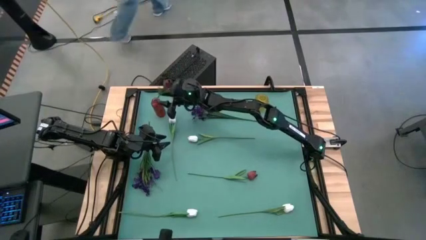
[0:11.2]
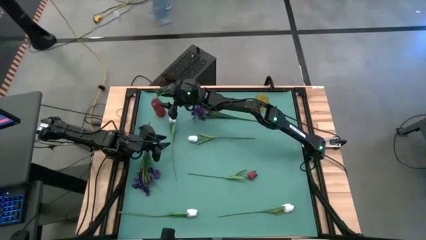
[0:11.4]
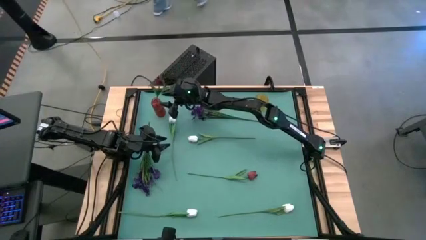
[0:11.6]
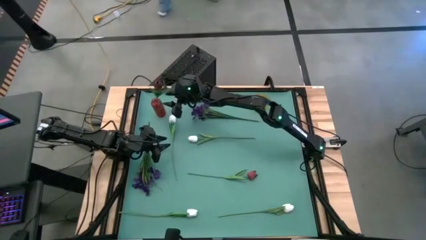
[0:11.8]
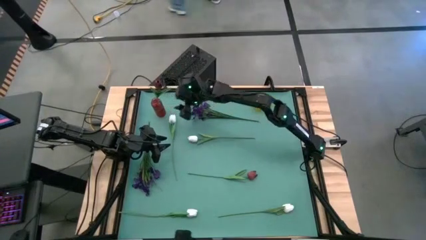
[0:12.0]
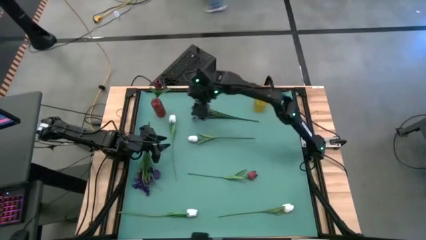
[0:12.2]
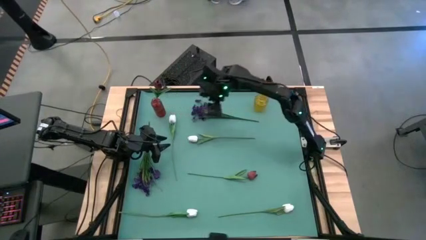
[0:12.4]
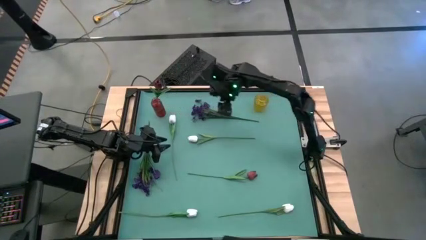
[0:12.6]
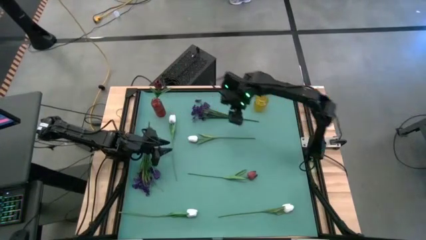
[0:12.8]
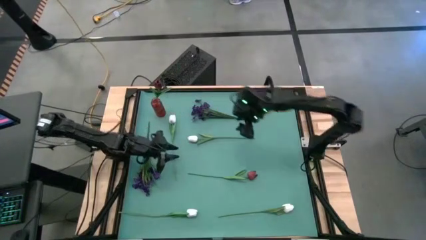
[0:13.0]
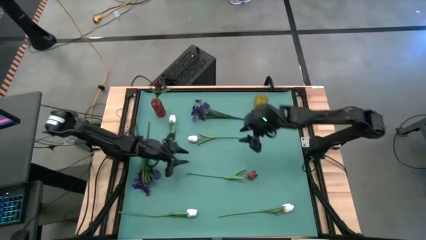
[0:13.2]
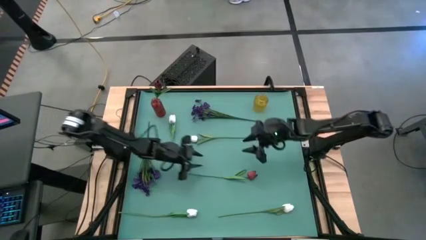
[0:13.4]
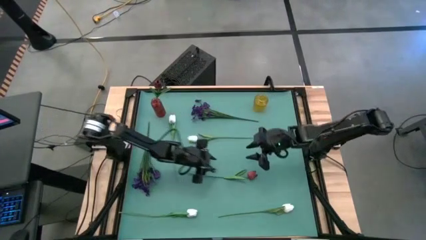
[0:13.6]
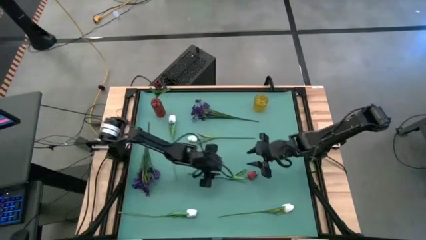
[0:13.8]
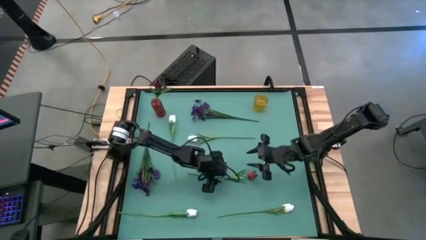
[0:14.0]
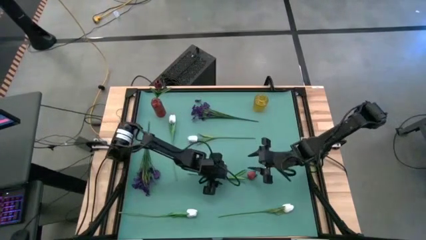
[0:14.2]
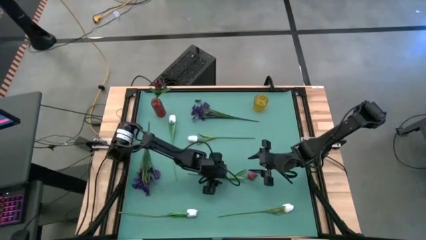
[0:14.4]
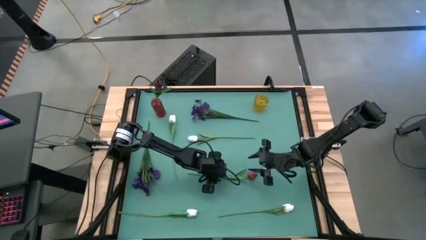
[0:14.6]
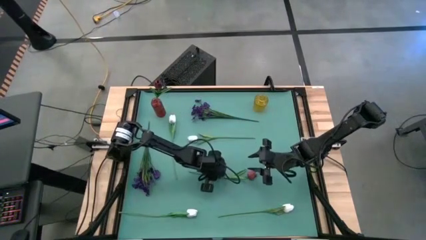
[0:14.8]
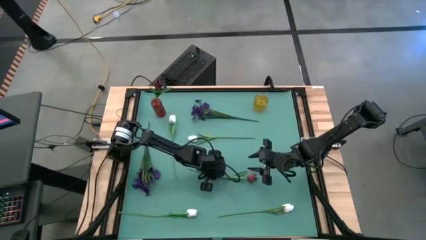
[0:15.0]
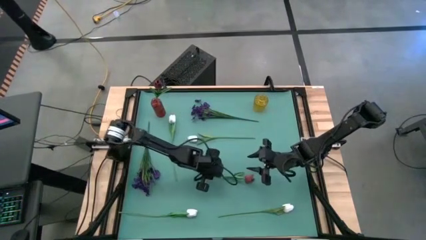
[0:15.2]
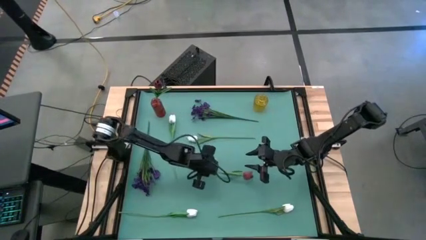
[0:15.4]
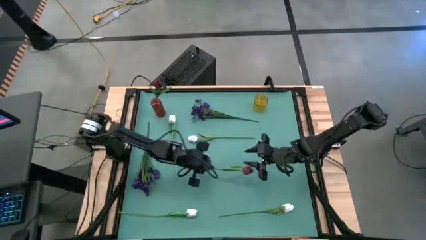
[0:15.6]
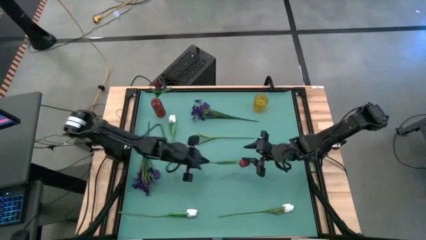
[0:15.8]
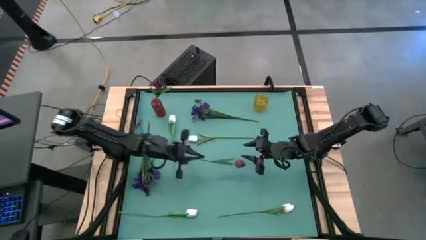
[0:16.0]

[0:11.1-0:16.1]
Task: Sort flowers into vase by color
Put the red tulip into the red vase

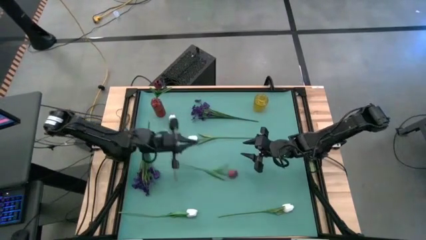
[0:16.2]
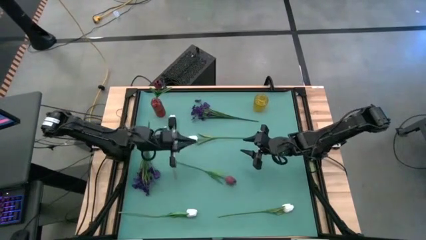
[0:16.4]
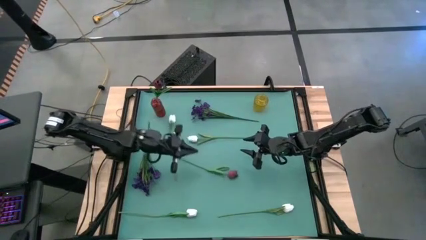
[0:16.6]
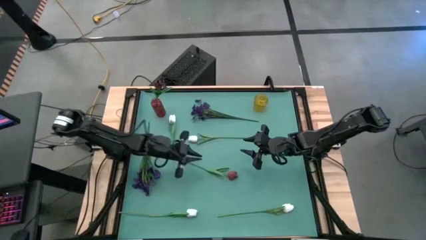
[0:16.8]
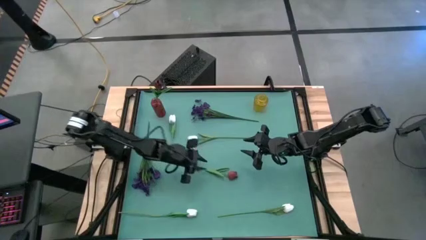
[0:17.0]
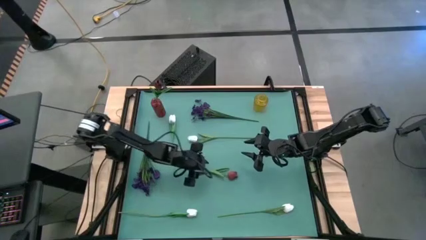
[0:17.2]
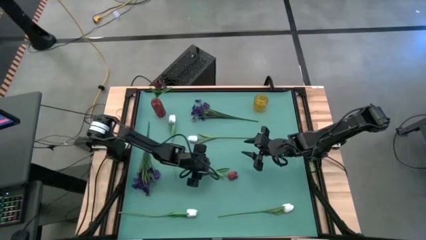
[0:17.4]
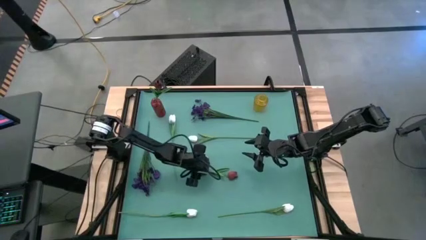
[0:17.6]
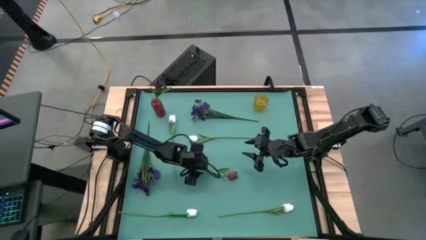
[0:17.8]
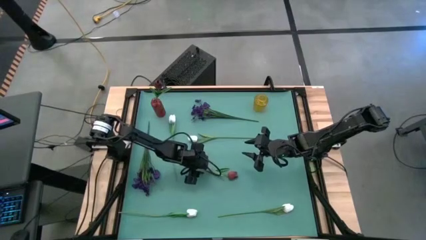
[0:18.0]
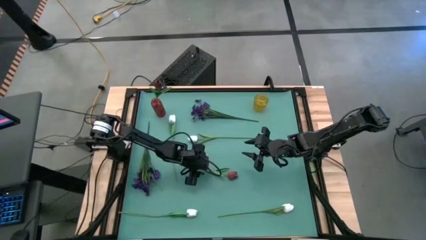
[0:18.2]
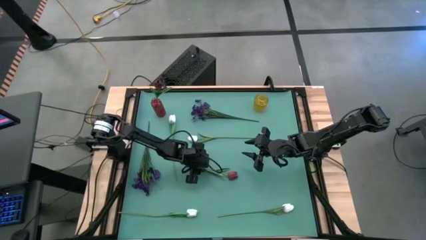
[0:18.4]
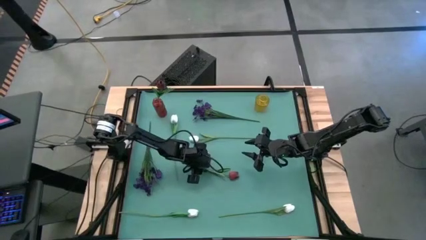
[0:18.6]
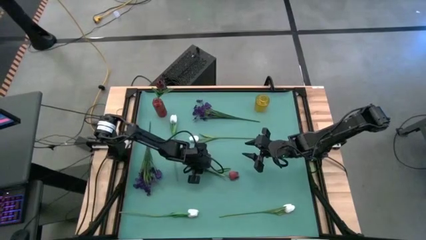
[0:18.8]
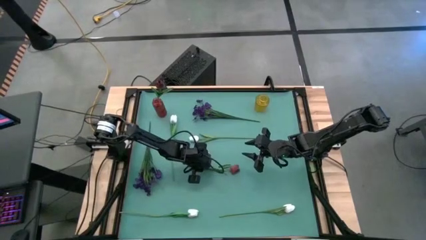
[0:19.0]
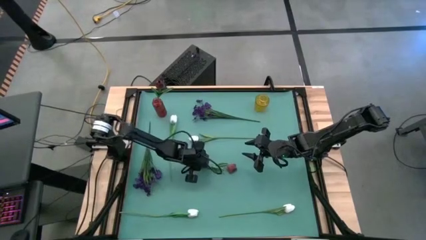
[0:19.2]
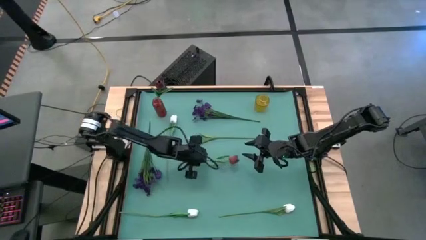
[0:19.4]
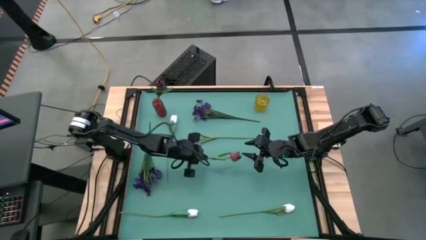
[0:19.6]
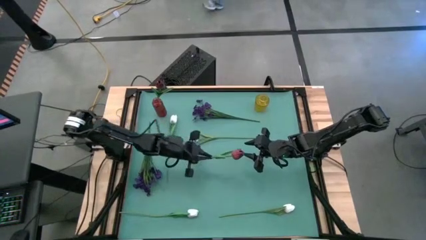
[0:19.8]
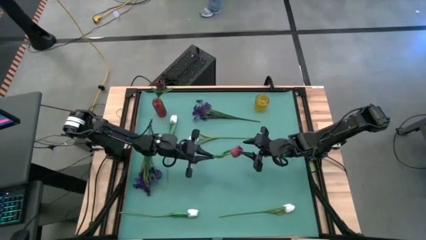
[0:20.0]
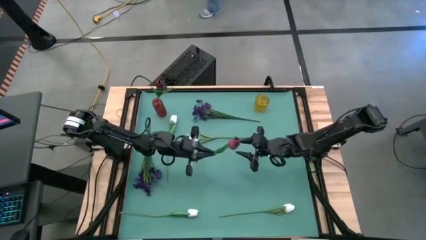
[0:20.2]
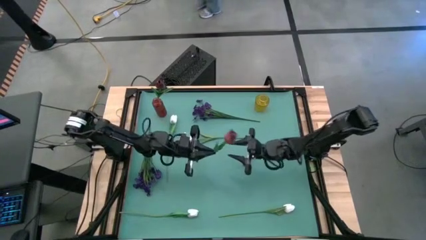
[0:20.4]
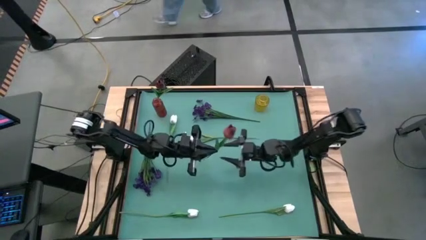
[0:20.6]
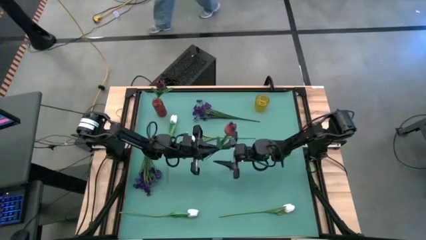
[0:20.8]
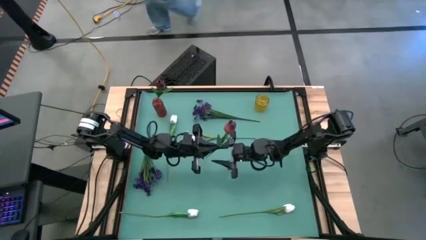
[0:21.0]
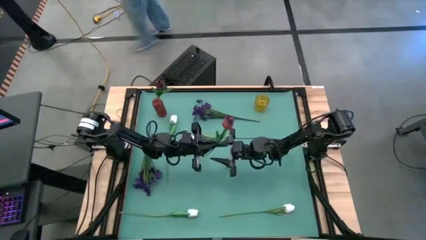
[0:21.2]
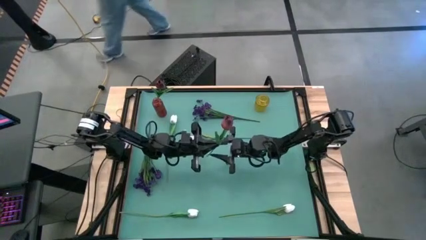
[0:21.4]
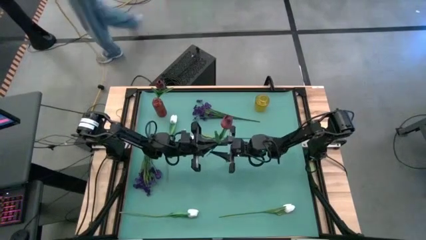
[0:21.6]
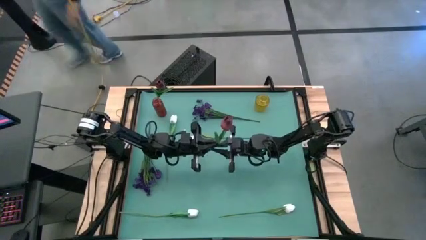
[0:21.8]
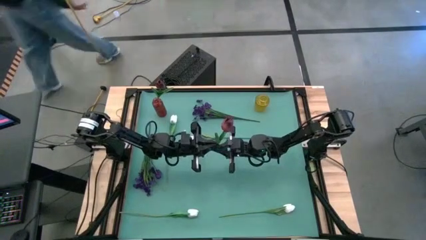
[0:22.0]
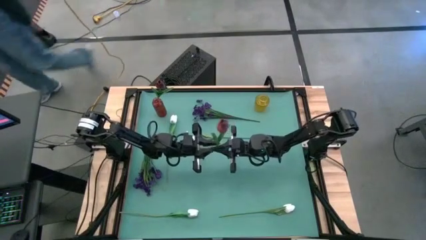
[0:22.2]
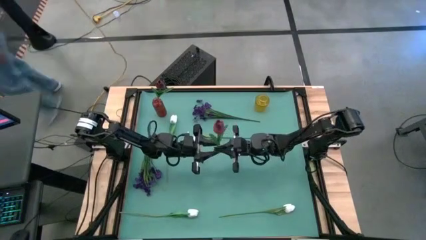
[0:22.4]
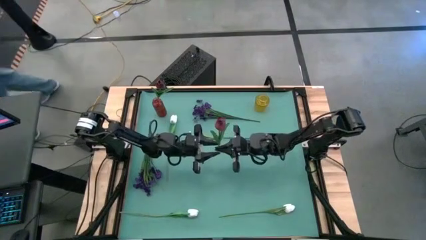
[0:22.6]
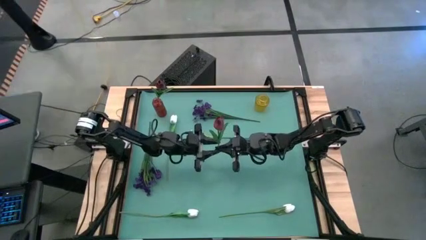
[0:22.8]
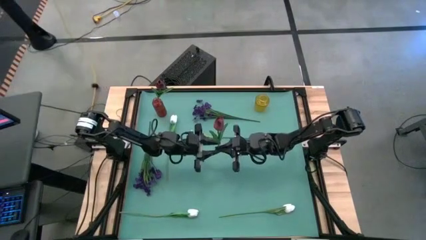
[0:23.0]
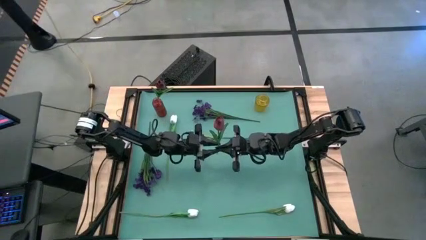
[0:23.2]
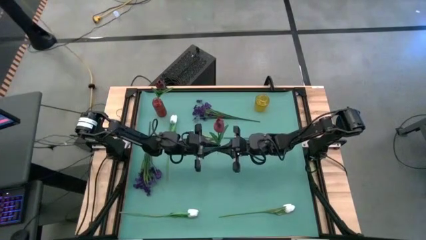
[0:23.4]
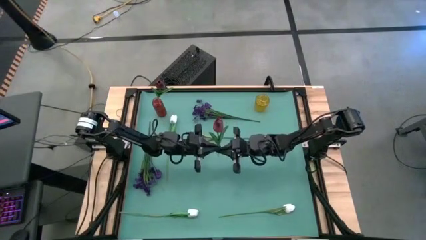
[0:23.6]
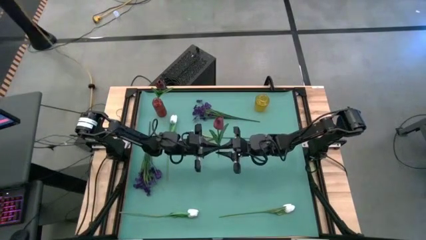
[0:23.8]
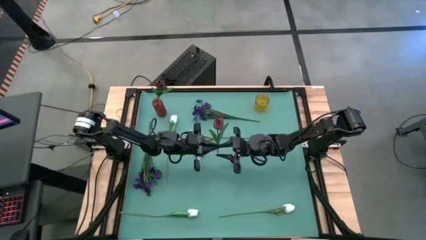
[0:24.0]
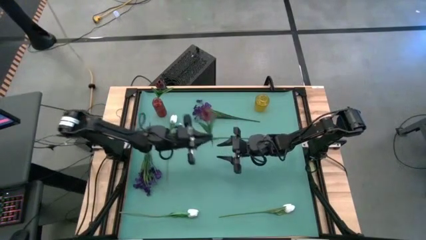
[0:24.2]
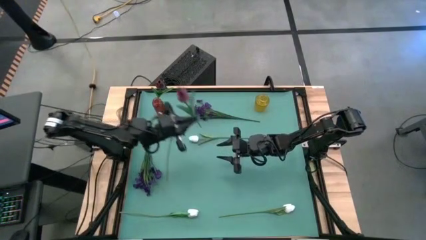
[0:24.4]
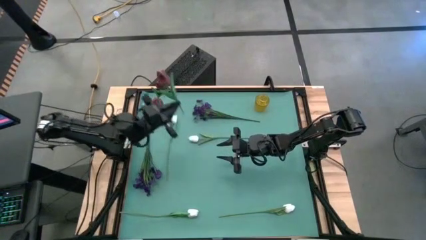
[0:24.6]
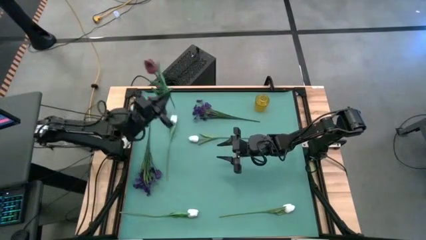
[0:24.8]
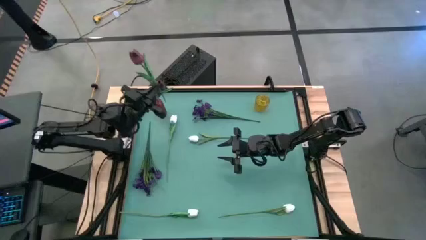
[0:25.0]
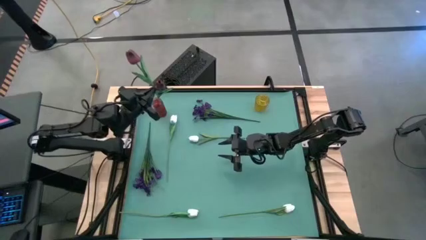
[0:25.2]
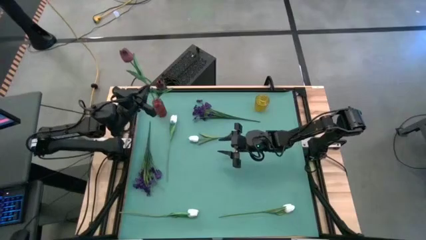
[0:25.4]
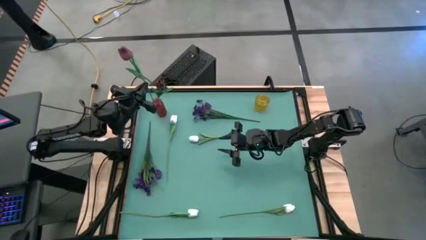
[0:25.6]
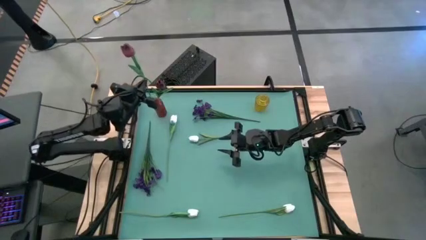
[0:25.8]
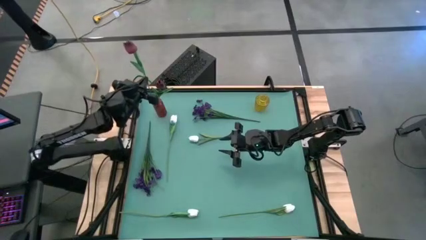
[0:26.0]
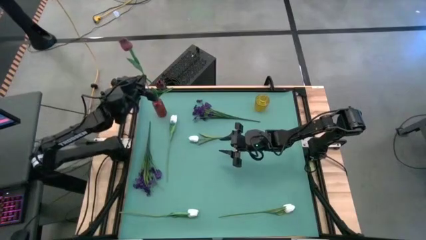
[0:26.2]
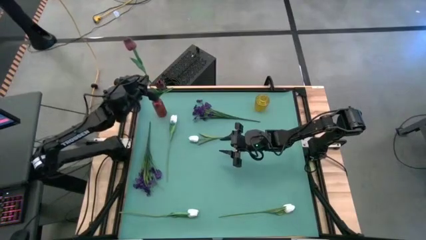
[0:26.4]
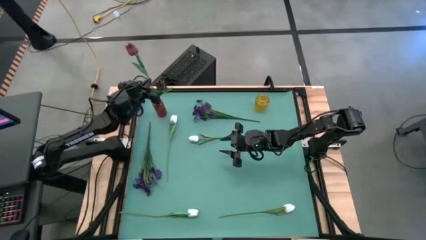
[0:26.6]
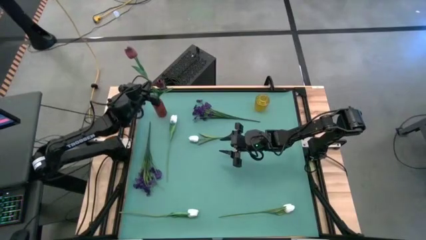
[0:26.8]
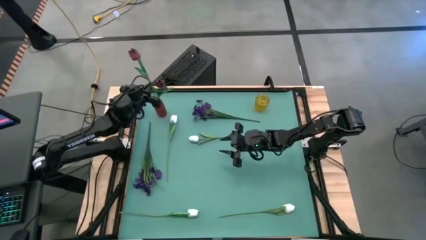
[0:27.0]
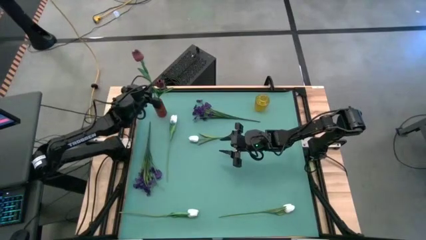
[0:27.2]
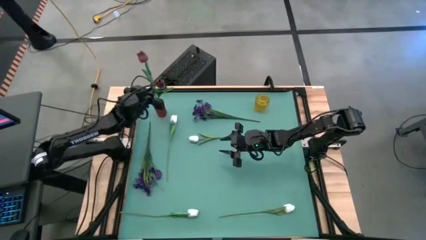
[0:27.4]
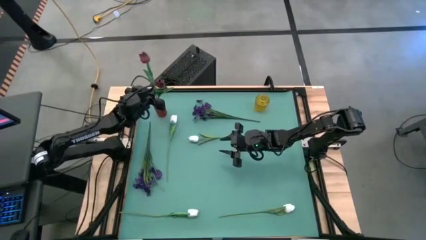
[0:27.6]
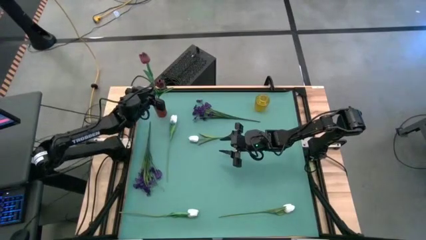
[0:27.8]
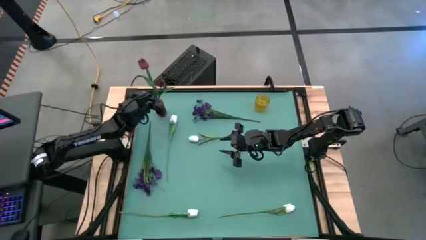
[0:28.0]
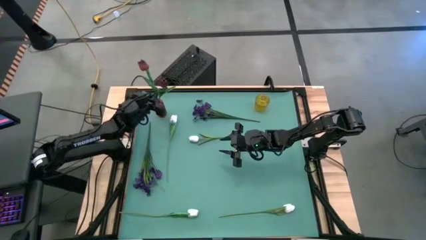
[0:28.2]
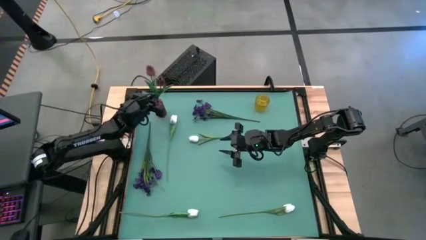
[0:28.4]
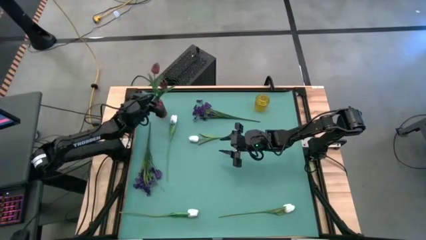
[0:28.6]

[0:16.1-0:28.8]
Put the red tulip into the red vase
